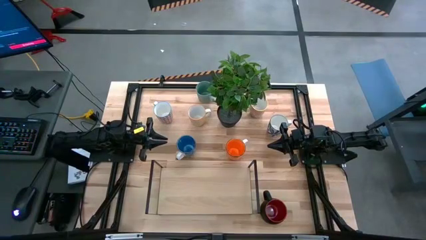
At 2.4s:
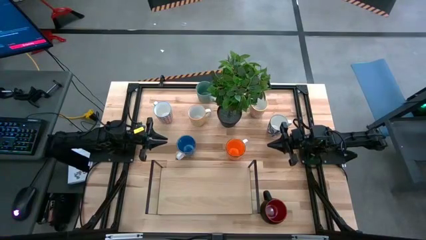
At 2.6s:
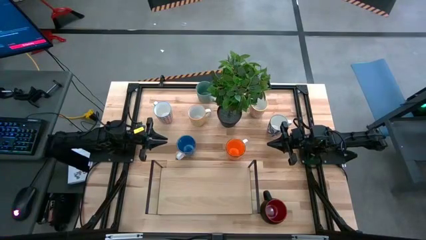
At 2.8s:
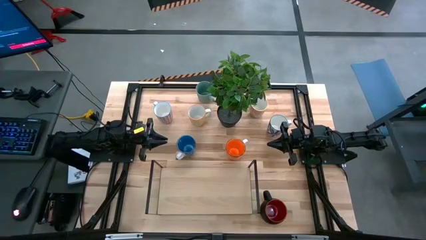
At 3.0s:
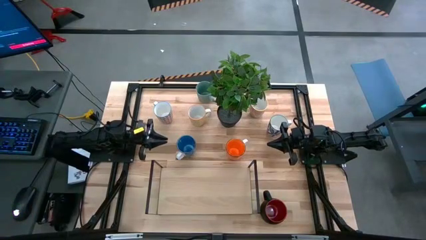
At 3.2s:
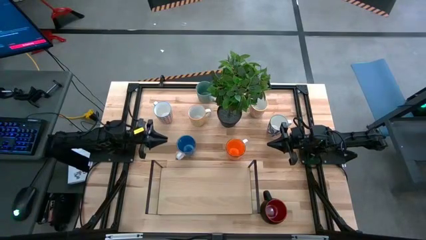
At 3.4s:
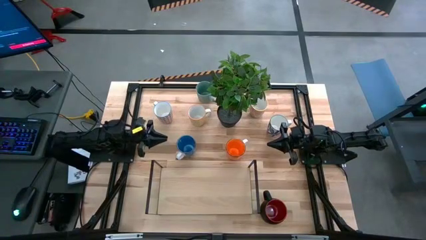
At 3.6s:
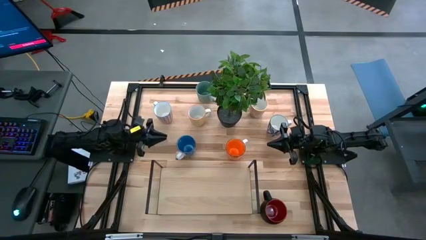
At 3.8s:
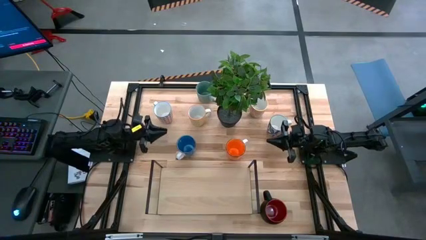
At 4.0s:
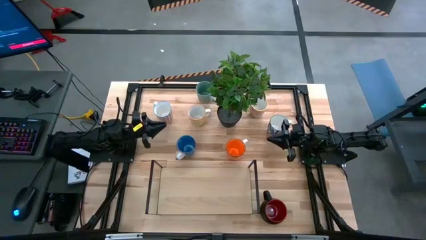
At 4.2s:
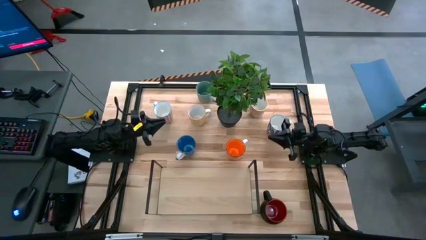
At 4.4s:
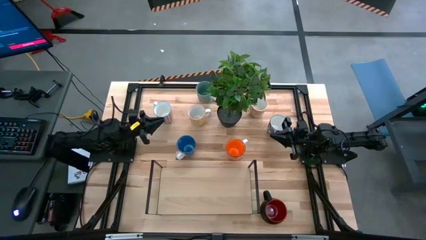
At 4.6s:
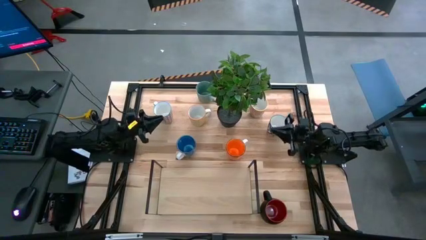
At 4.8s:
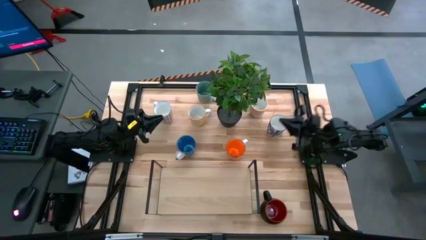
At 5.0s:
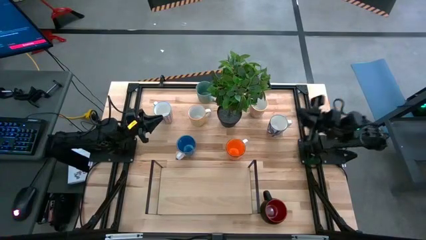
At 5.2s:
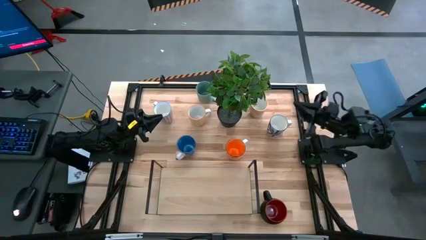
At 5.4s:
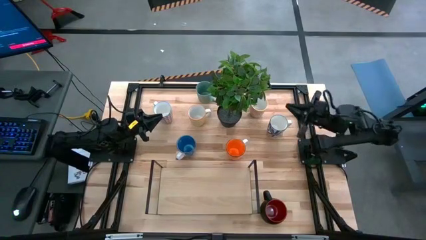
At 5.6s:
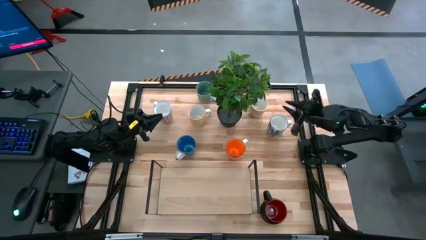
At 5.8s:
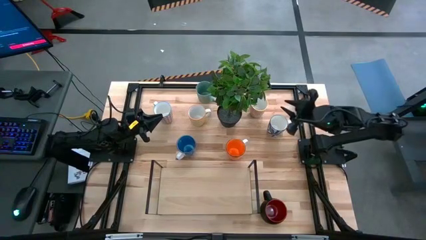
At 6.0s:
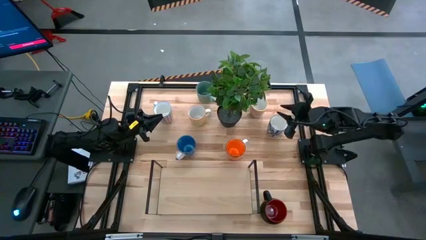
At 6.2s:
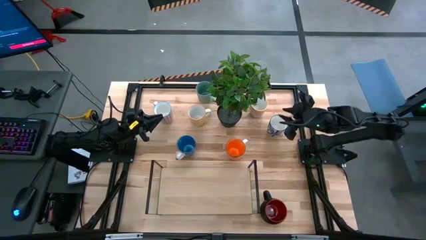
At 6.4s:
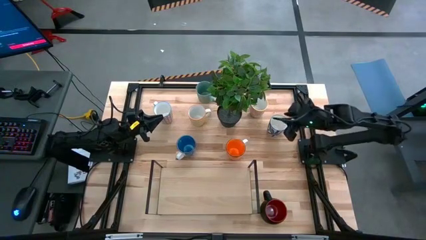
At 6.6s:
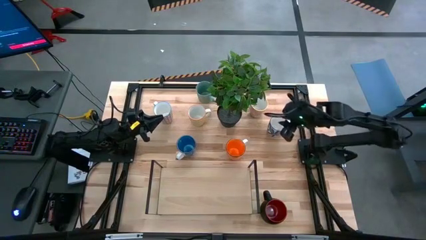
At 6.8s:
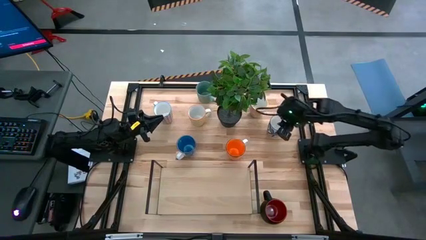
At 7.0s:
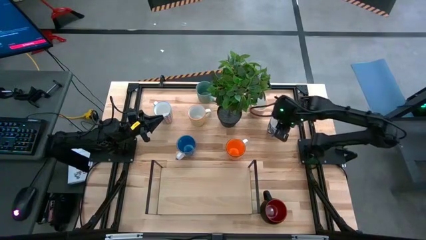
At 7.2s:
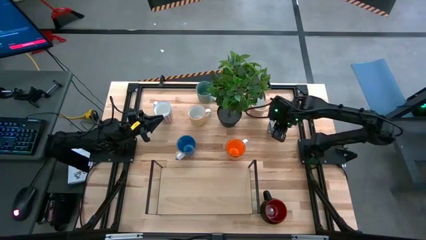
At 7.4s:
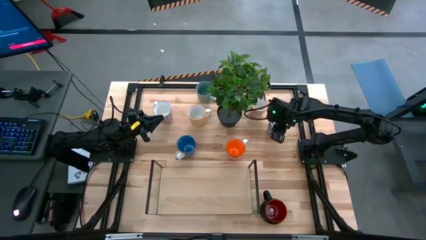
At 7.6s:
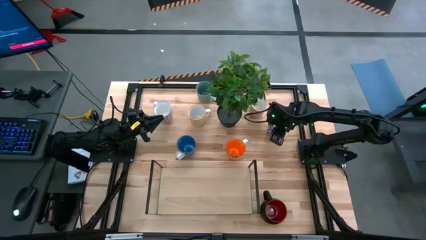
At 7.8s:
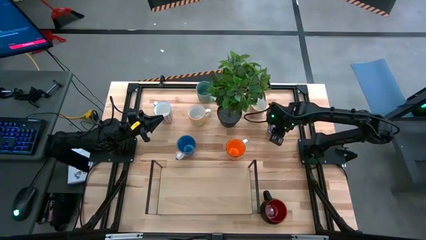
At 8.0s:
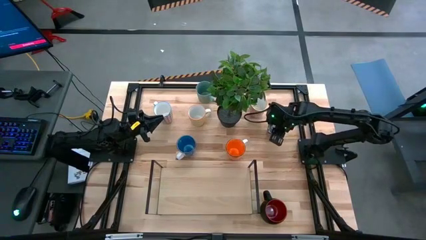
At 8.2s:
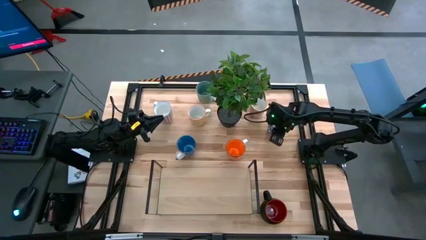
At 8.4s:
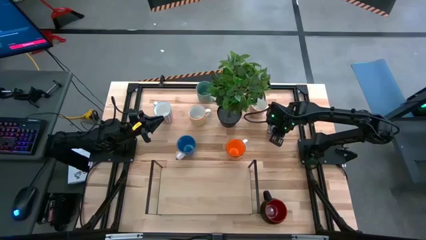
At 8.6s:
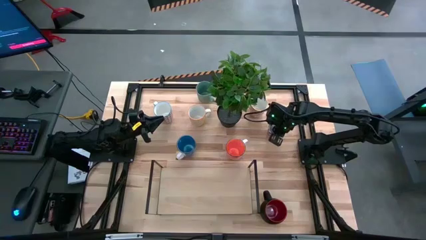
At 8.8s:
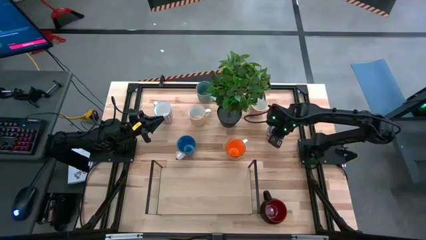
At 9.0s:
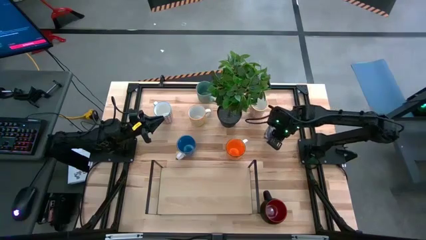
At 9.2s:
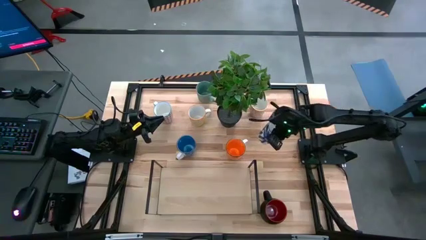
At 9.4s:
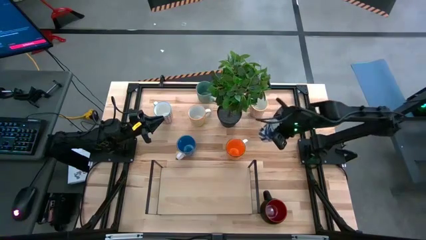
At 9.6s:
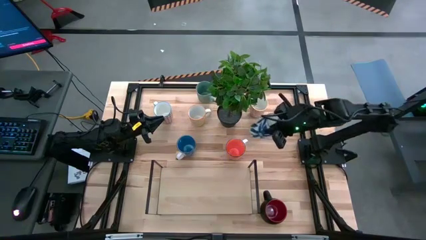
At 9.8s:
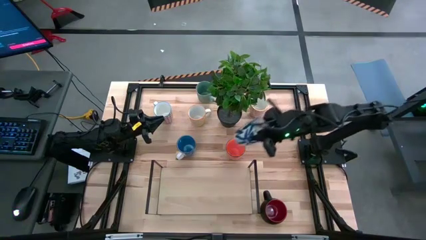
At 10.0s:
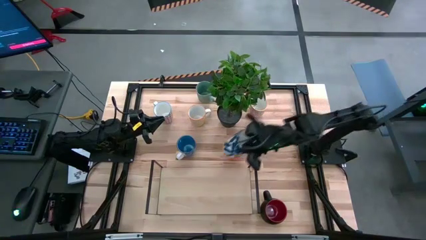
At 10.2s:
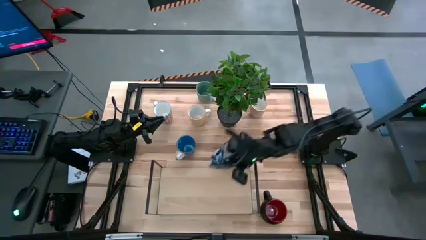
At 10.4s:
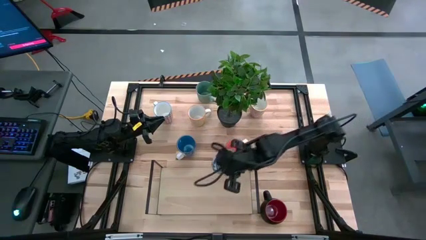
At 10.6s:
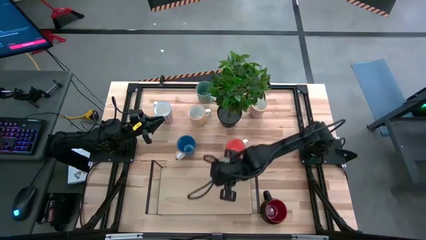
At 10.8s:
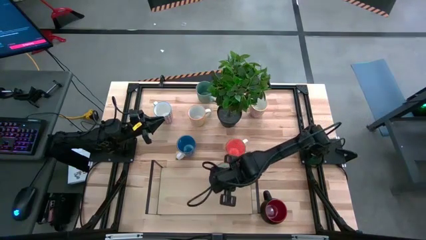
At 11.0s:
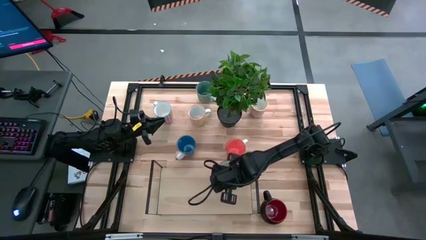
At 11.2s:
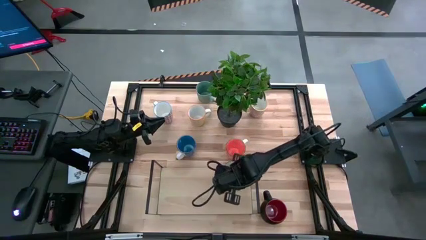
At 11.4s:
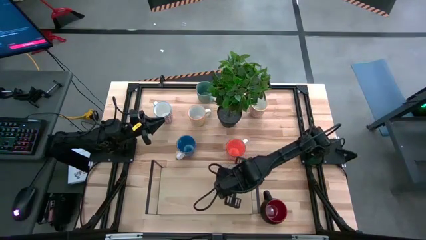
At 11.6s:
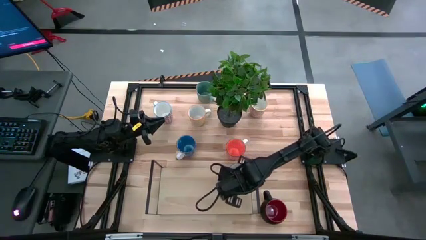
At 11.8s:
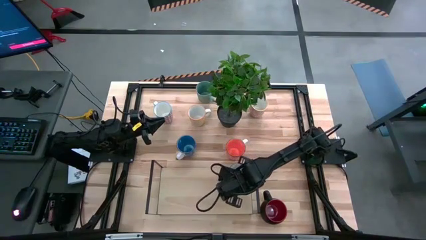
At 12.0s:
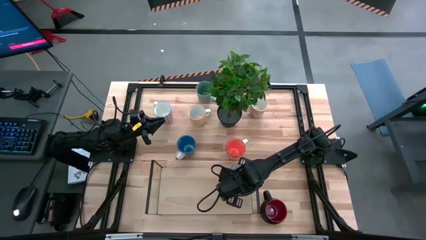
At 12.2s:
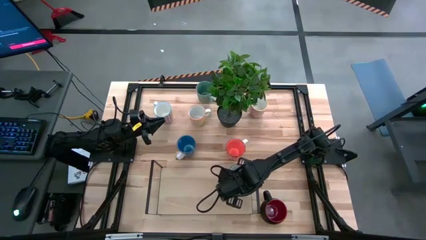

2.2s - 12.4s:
Task: Place coffee mugs
Put the white-blue pattern mug on the shelf

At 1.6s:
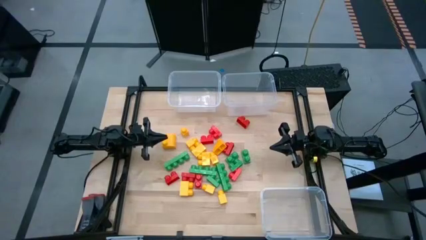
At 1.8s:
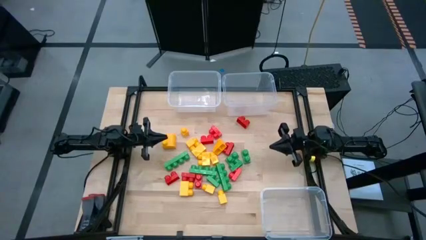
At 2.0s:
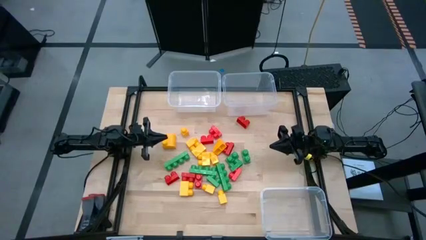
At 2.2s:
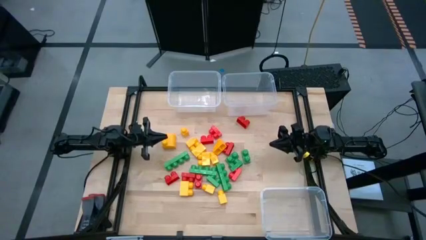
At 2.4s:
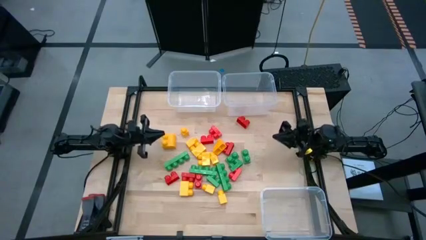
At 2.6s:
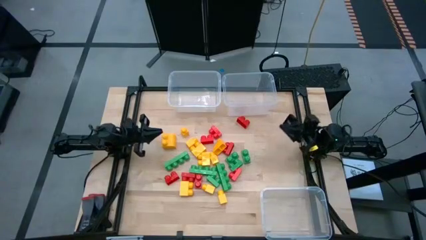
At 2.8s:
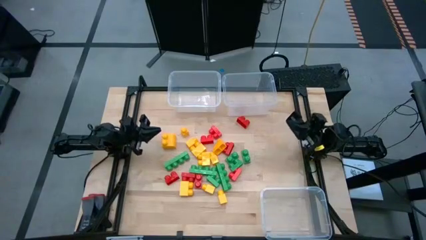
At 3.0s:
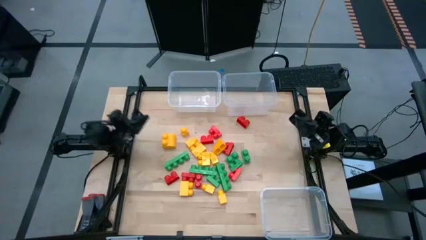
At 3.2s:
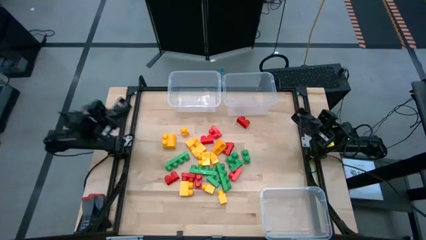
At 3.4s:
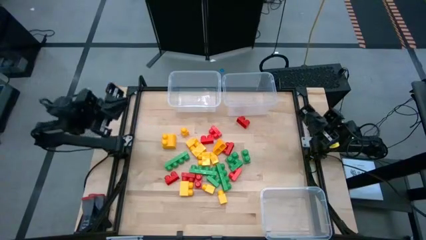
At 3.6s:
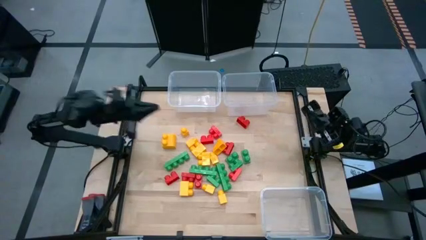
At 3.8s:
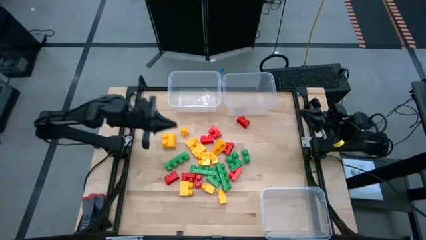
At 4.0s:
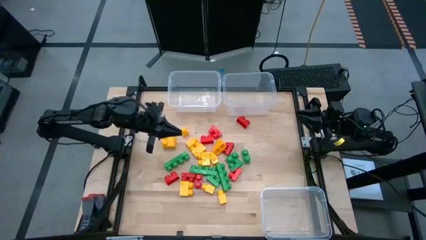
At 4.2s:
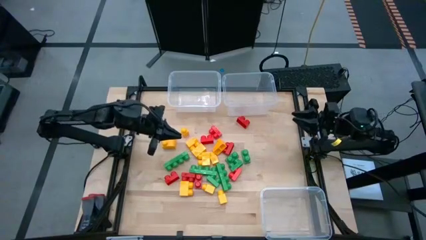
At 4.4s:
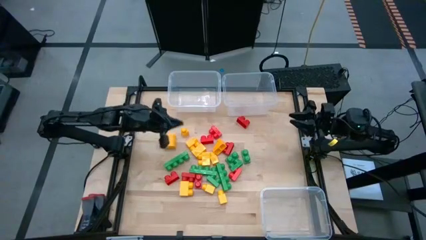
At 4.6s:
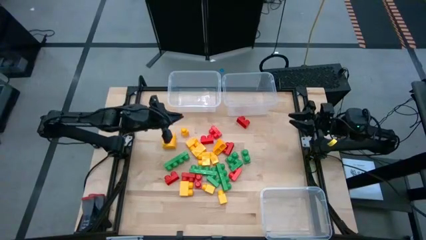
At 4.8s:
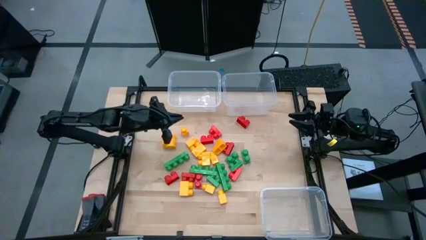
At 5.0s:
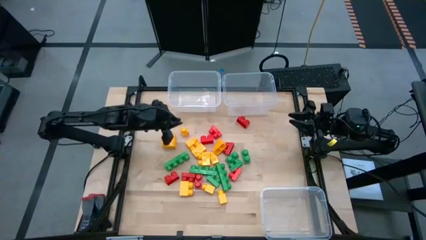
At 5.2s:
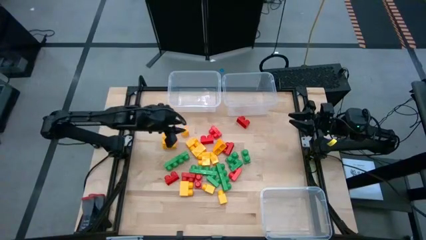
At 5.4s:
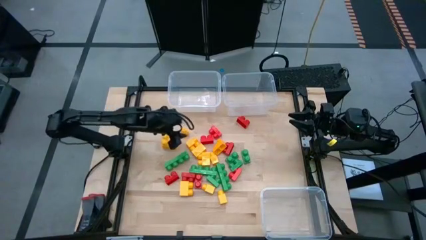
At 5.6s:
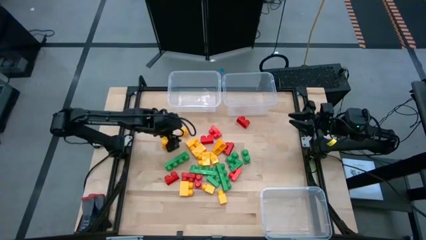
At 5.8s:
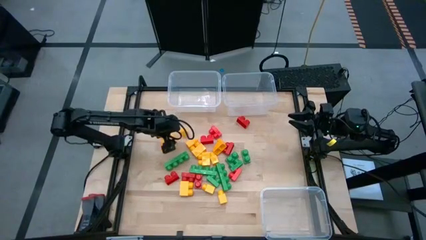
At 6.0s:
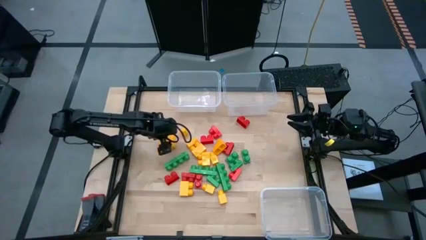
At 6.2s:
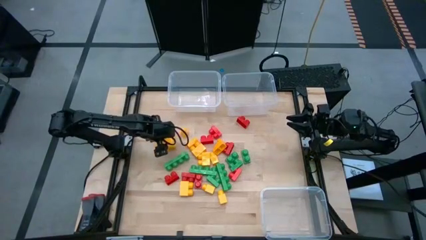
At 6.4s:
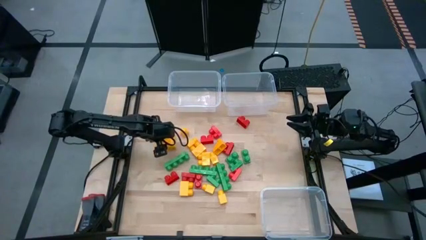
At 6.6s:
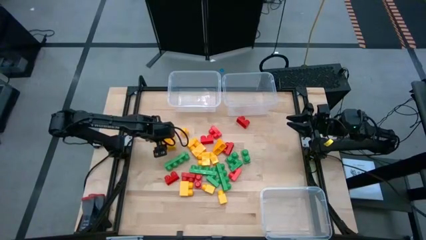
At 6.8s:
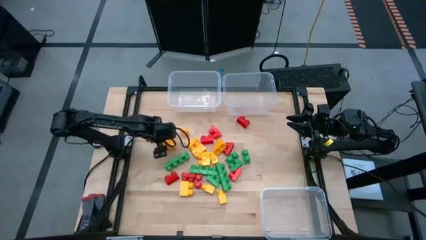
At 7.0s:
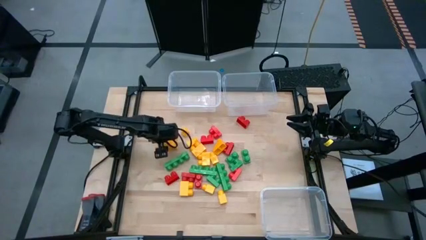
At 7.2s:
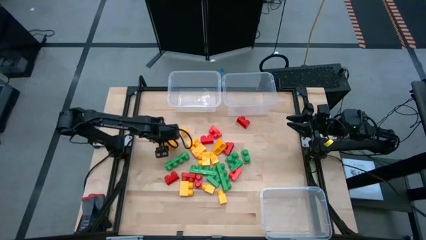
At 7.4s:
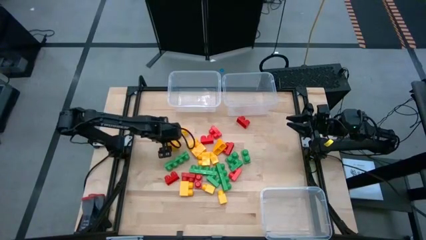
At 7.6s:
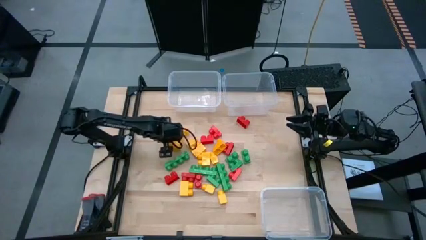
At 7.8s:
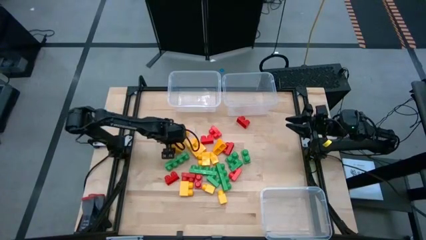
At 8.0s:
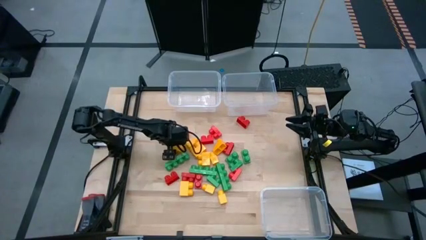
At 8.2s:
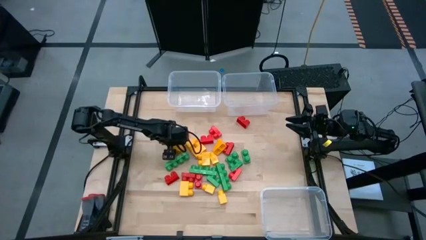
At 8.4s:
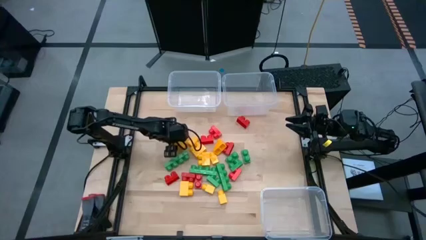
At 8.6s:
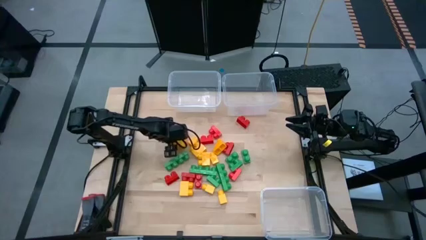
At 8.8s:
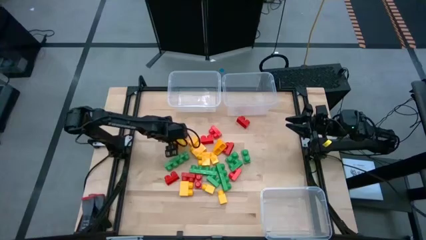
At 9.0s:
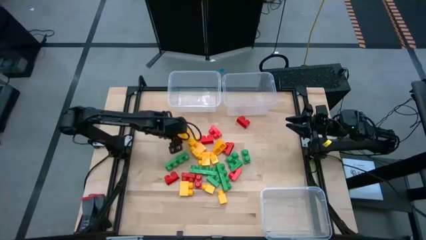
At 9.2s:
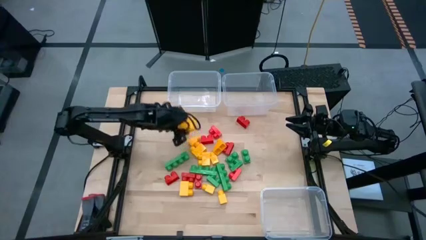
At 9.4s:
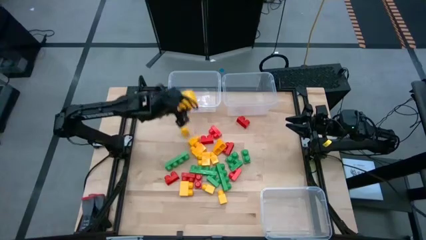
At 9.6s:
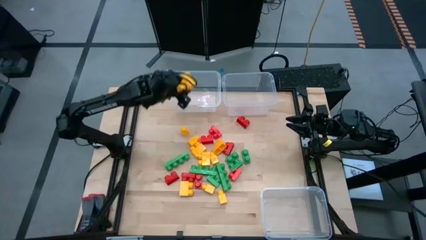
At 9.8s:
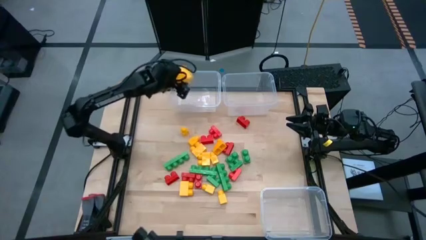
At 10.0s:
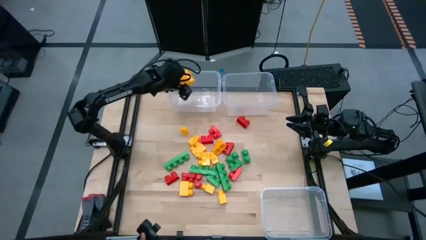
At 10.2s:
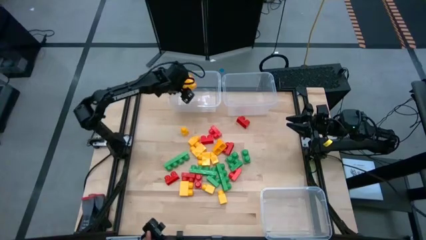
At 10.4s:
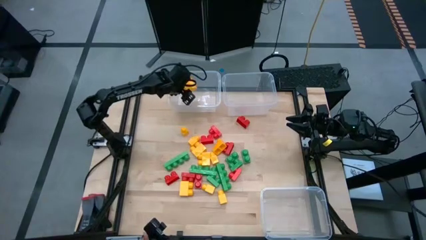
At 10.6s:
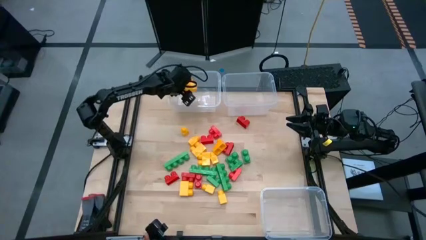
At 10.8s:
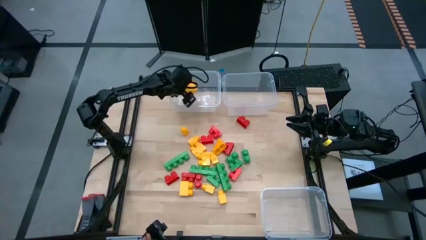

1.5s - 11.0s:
Task: Sort blocks
Put the yellow game piece into the top left transparent bin
